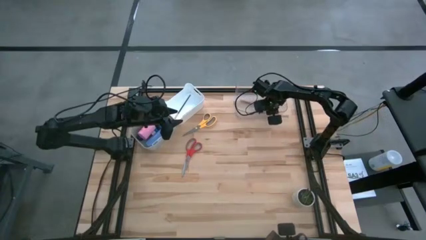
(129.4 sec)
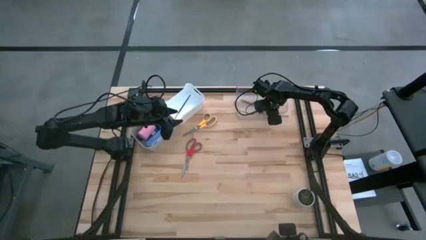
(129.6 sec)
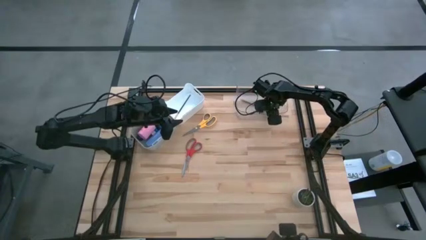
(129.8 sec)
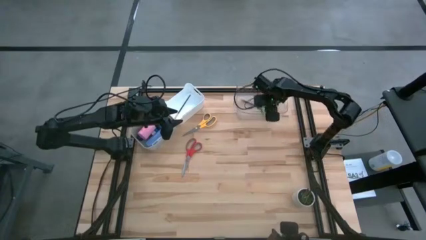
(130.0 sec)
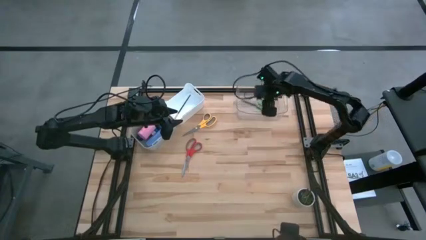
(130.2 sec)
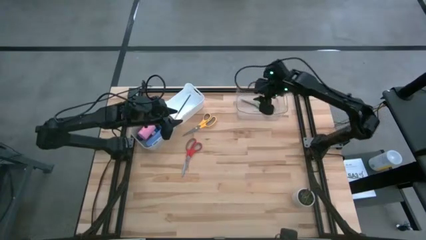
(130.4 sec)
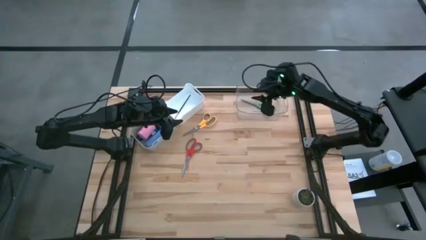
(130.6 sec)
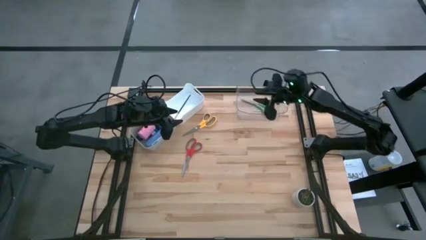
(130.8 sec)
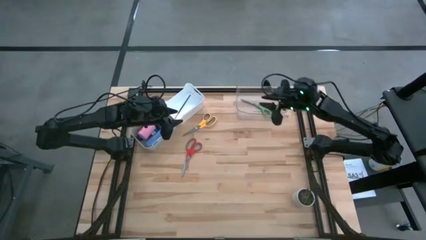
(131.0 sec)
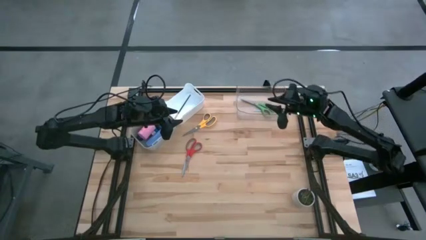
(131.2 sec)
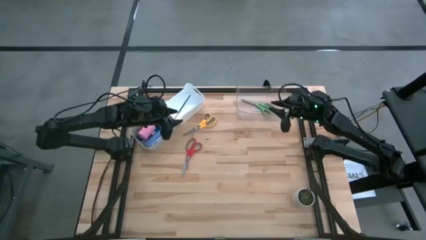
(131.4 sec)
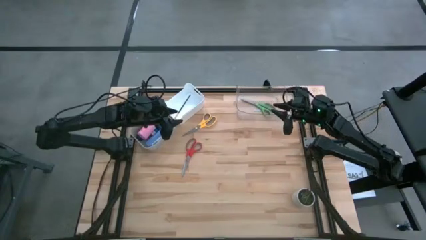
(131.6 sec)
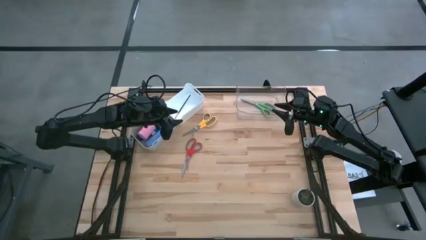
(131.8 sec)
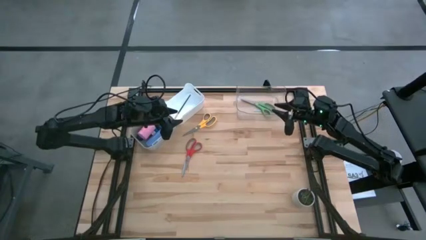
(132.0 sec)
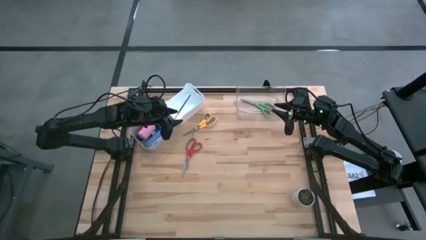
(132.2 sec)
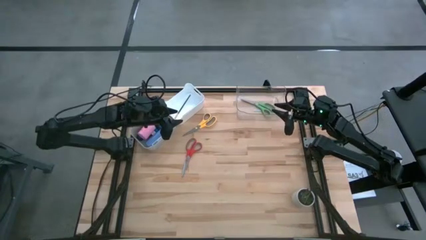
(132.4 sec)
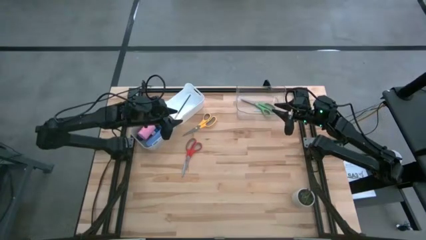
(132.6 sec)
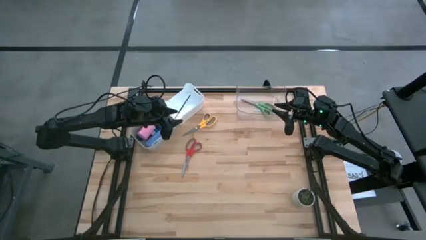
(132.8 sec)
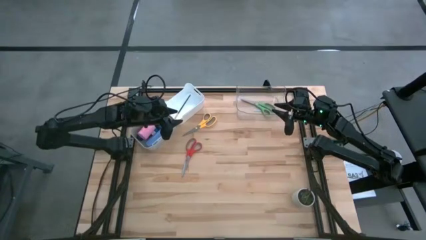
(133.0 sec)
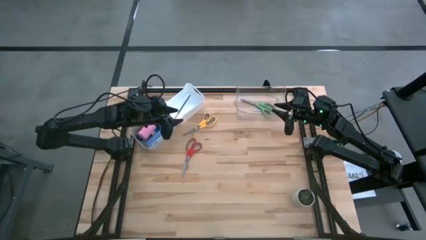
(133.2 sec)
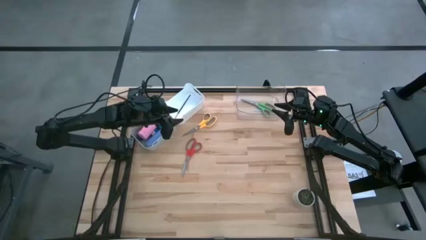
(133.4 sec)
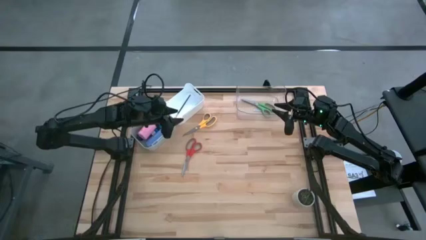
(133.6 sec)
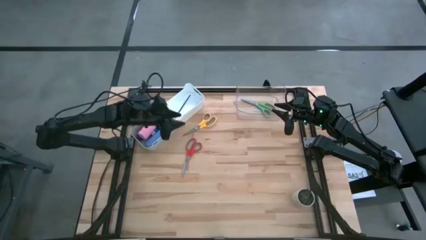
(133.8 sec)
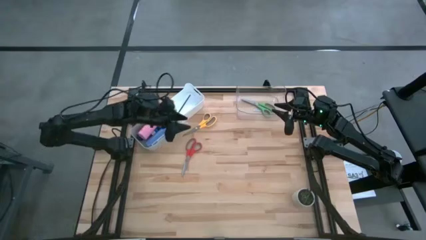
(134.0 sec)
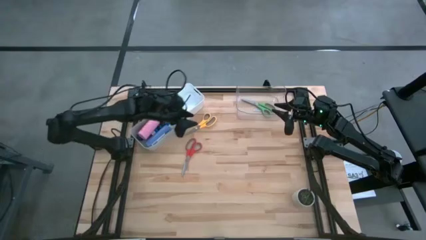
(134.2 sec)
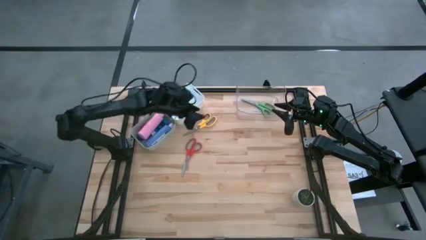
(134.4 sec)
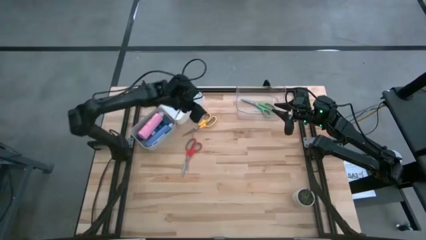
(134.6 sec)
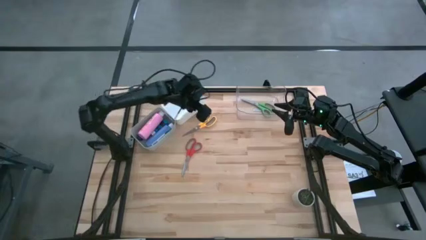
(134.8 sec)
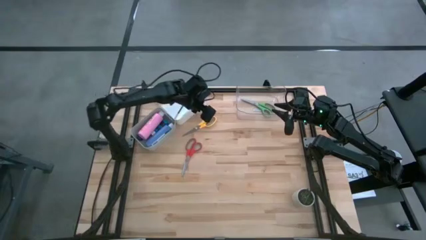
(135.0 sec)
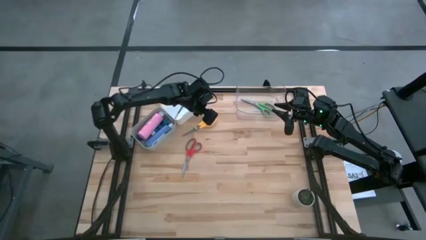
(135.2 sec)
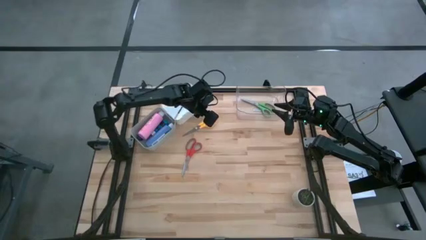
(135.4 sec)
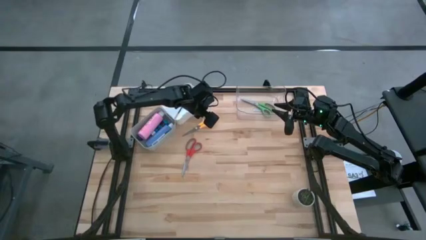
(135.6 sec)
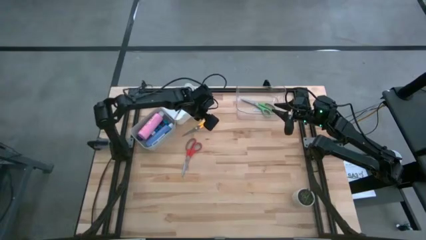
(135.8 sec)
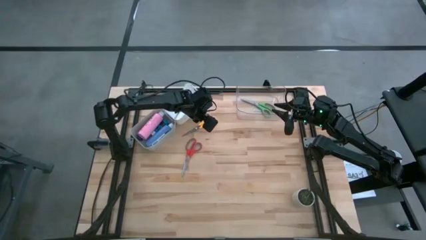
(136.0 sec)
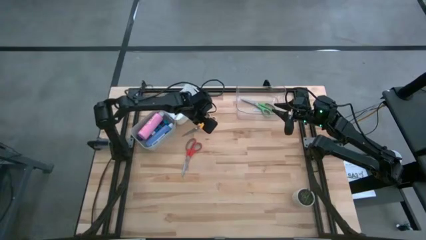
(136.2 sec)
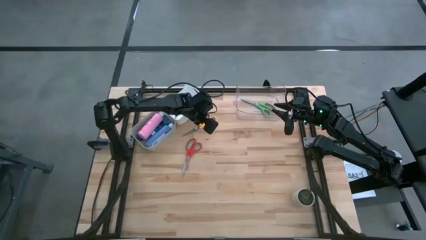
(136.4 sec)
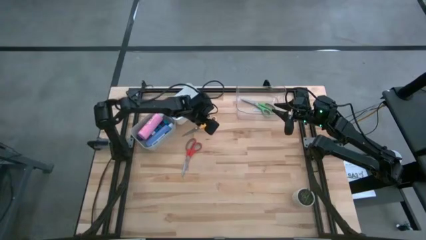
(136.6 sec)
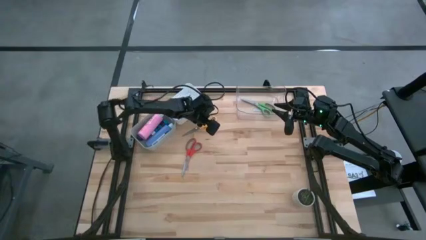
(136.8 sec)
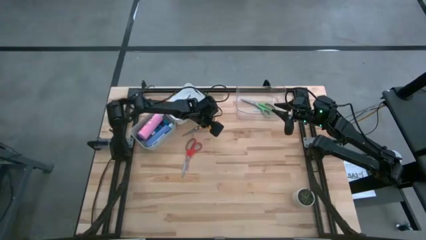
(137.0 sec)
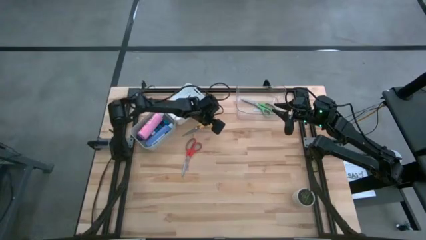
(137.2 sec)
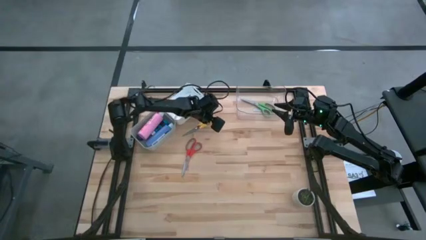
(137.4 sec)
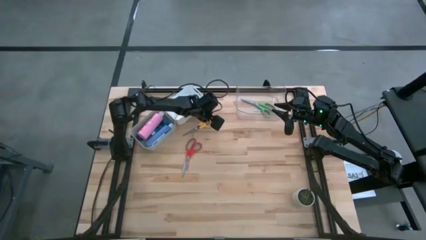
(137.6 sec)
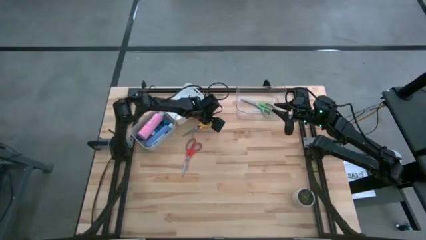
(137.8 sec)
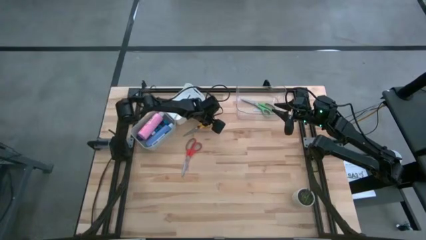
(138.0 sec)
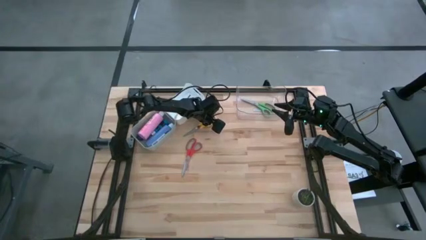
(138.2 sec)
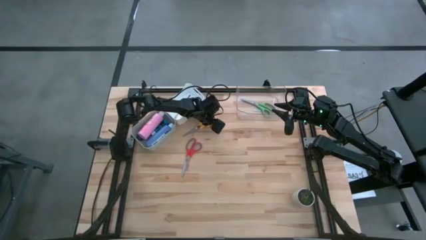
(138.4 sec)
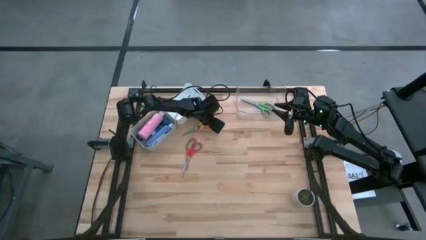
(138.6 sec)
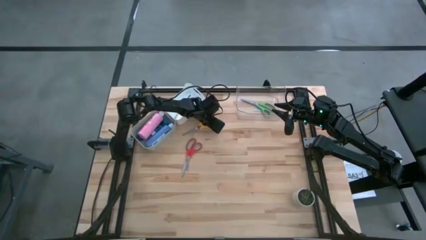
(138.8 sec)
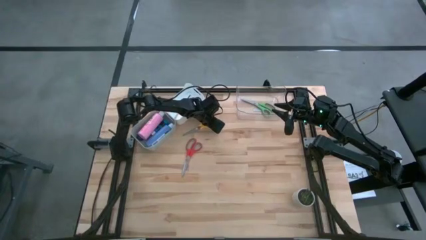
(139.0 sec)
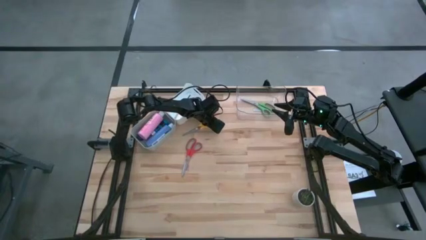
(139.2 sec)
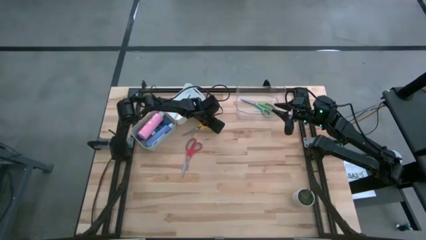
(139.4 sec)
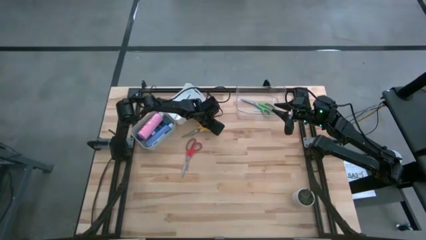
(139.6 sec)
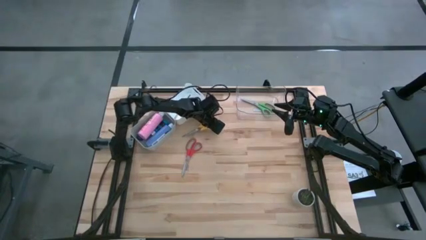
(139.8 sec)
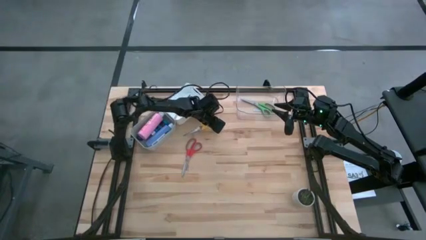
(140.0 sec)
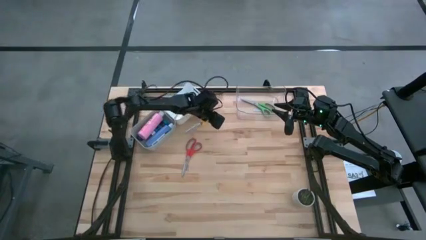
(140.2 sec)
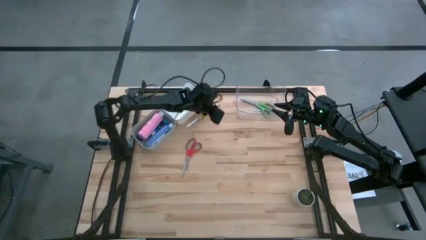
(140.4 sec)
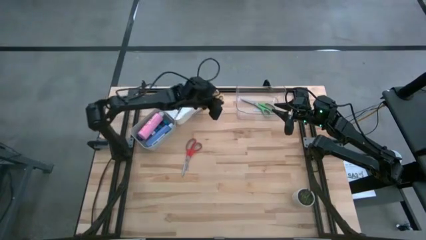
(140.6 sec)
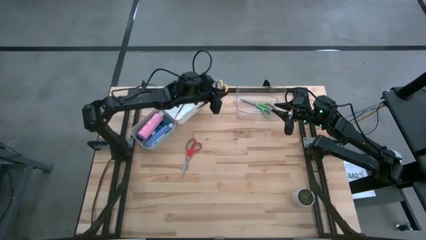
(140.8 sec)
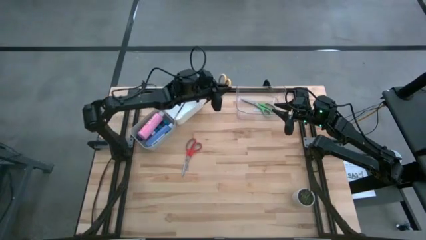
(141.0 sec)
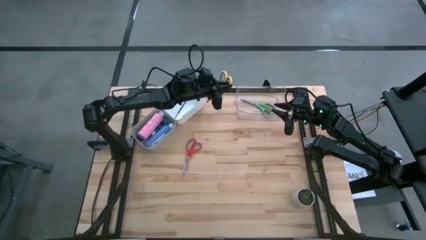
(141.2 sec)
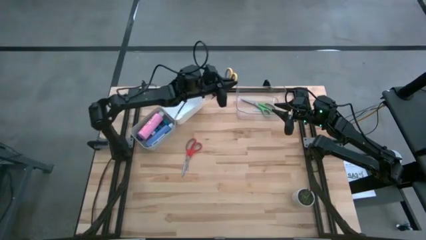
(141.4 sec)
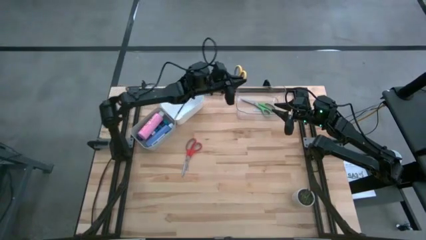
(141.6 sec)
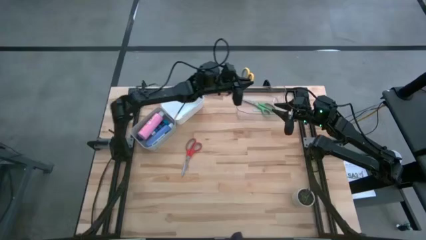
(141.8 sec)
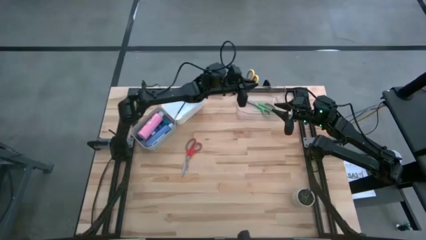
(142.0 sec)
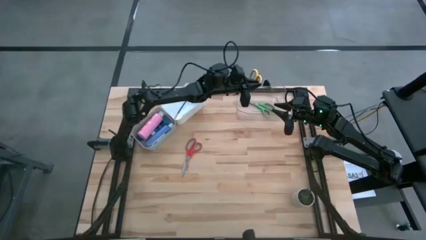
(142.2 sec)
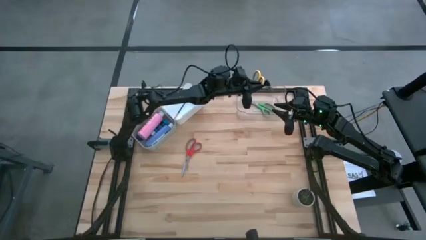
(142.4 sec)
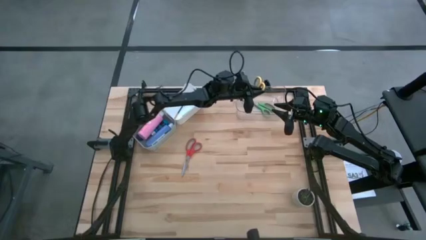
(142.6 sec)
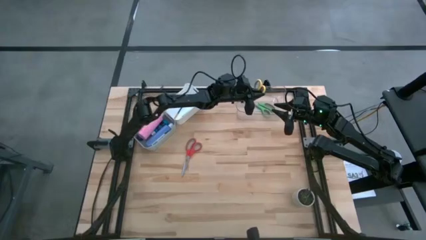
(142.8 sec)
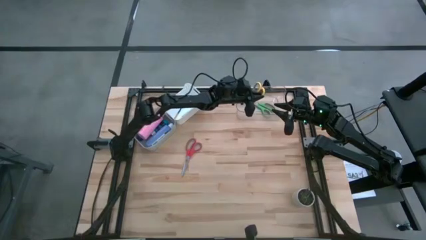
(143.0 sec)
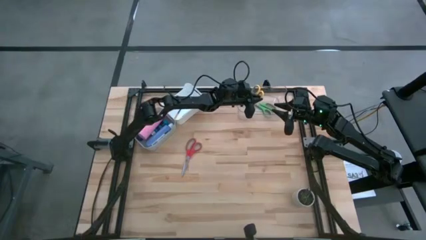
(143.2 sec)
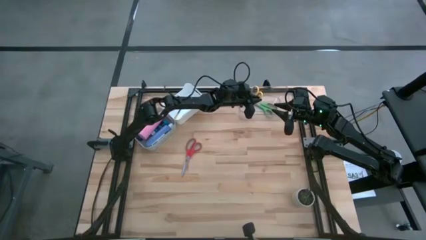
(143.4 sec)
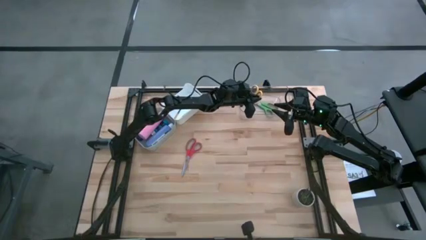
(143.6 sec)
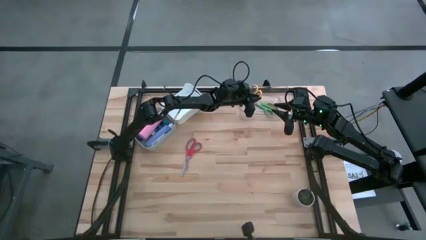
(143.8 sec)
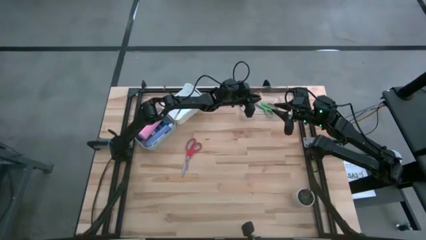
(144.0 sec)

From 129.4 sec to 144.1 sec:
Task: Pick & Place Paint Supplies
Put the yellow scissors into the transparent bin

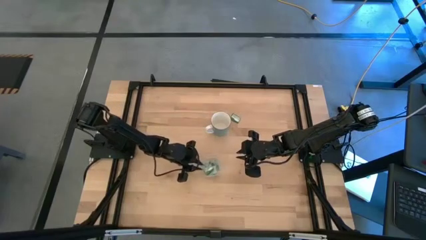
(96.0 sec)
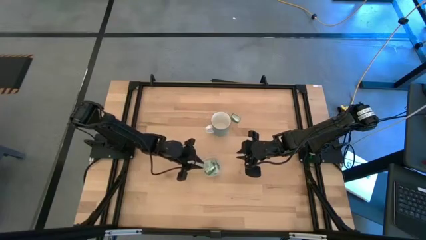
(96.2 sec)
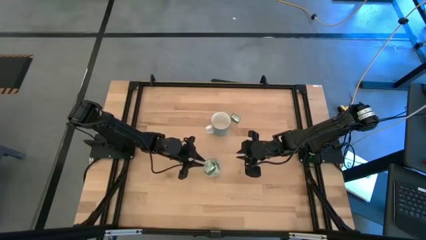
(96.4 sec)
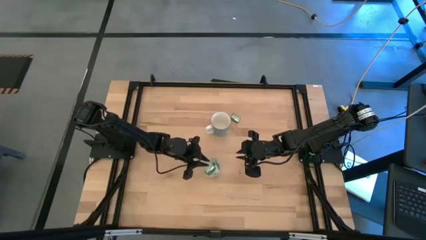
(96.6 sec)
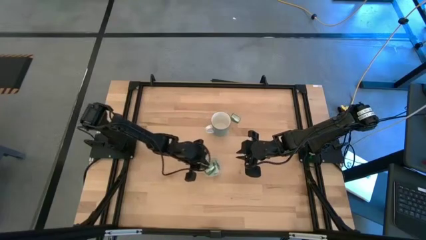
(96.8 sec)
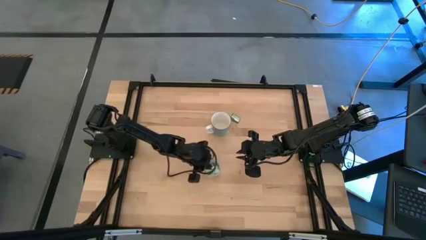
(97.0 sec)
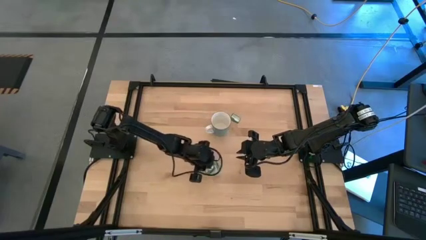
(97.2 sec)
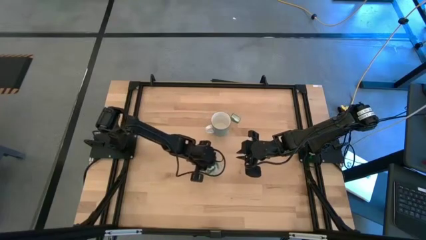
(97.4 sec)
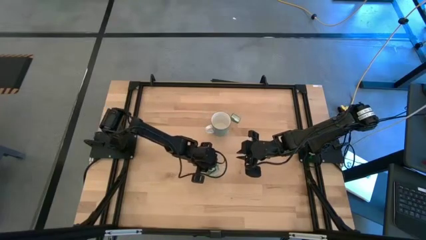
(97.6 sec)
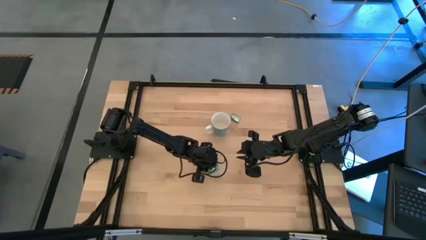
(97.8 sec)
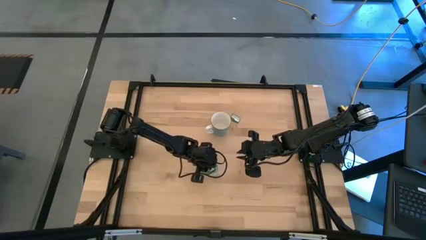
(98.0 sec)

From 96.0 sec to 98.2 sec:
Task: Pick and place Stevia / Truvia into bins
Adjust the stevia packet in the small bin
